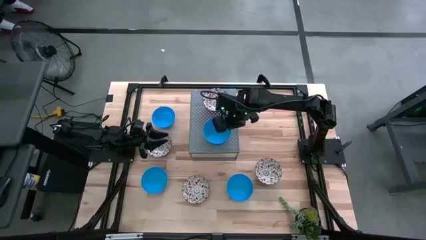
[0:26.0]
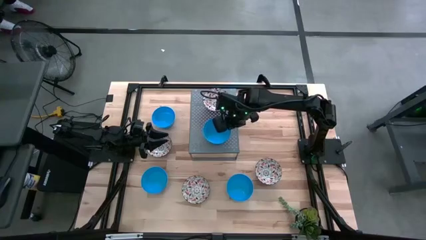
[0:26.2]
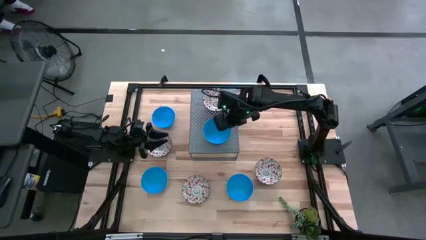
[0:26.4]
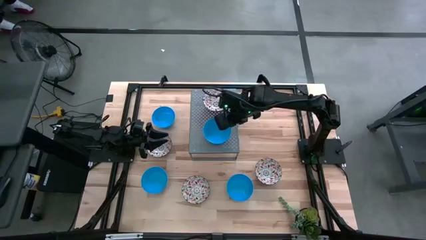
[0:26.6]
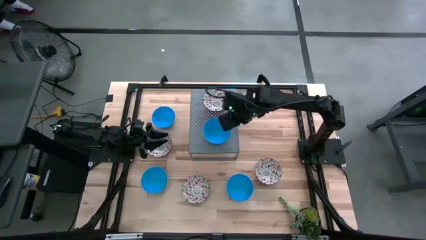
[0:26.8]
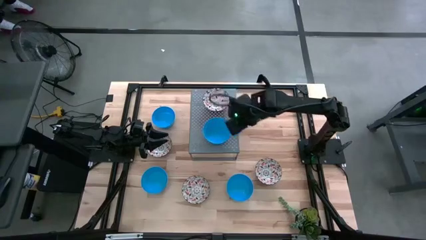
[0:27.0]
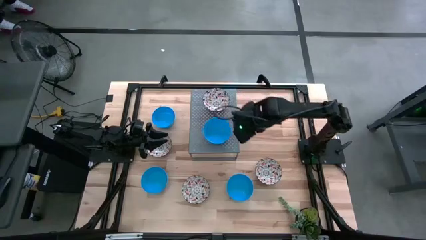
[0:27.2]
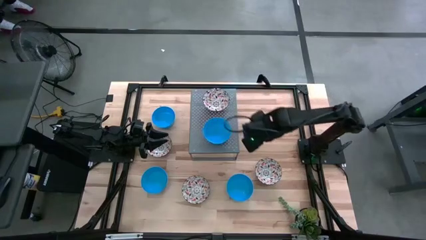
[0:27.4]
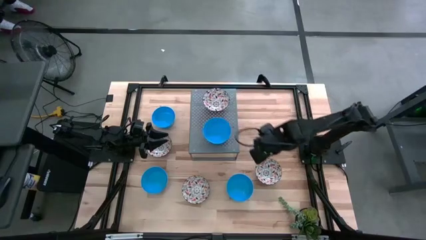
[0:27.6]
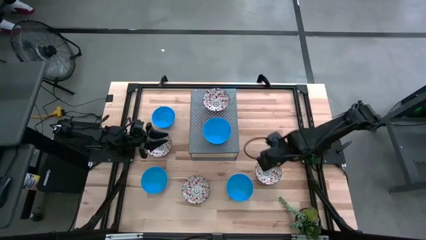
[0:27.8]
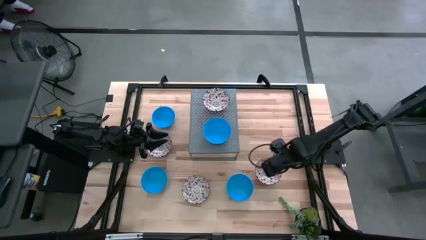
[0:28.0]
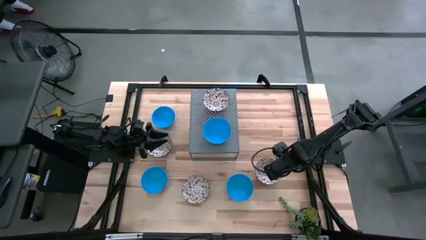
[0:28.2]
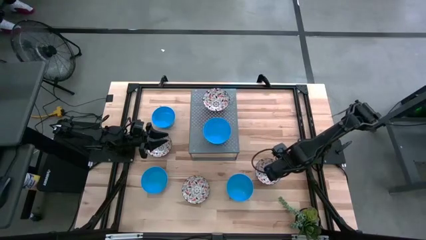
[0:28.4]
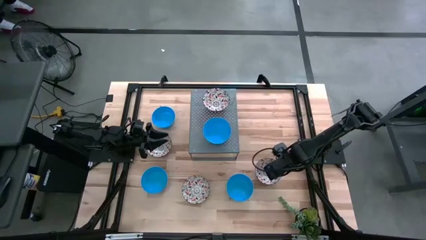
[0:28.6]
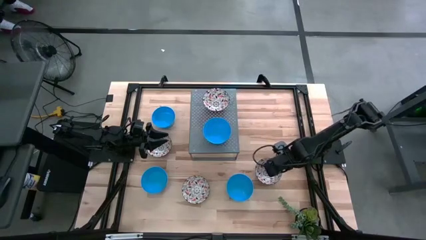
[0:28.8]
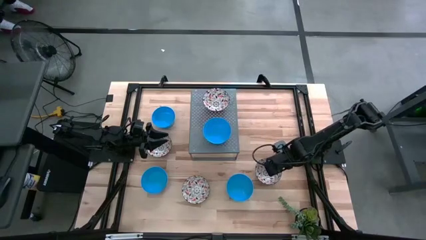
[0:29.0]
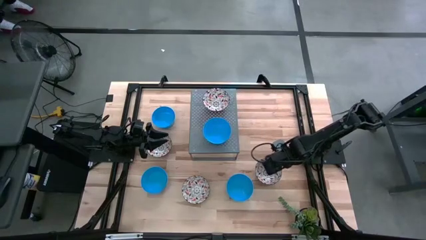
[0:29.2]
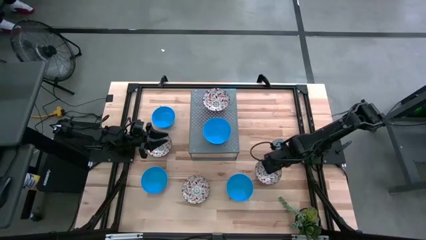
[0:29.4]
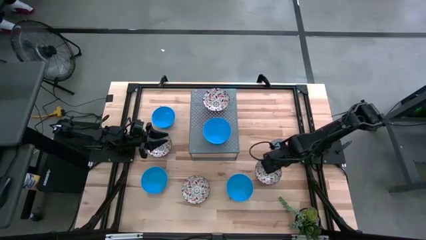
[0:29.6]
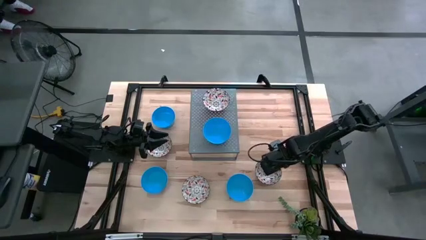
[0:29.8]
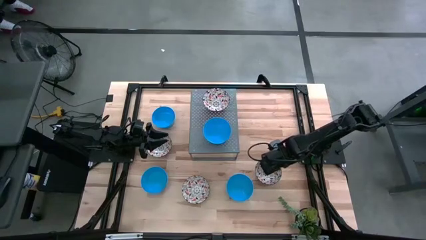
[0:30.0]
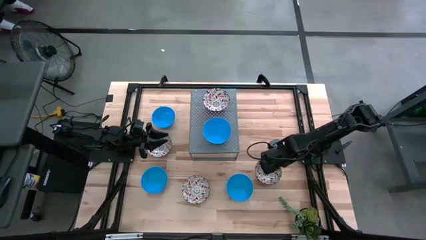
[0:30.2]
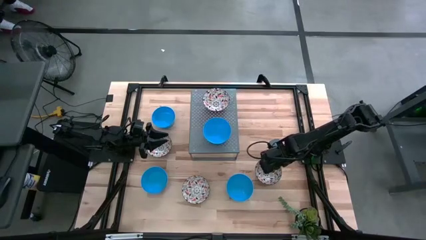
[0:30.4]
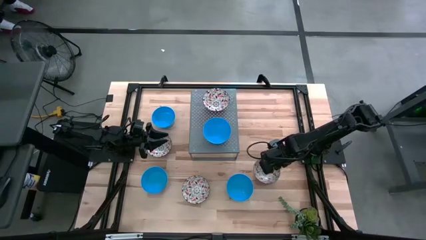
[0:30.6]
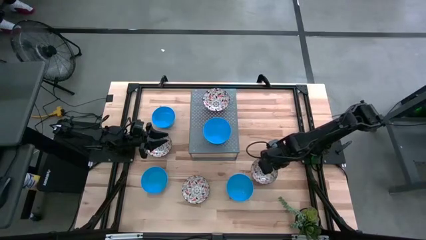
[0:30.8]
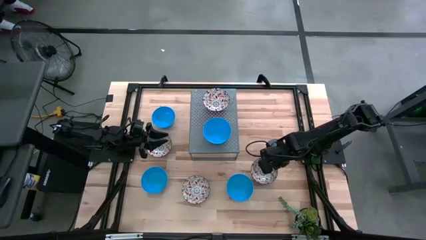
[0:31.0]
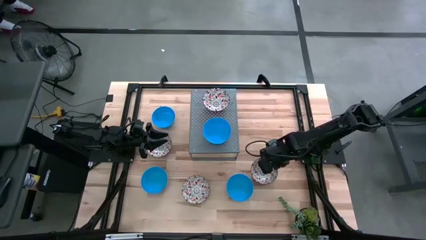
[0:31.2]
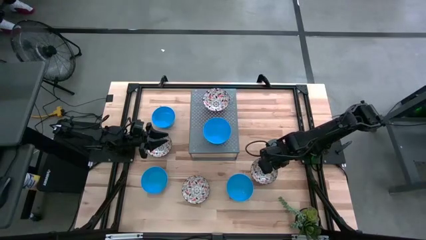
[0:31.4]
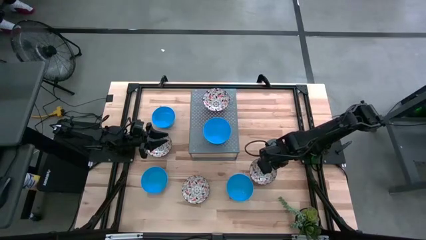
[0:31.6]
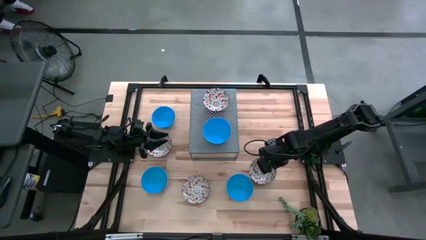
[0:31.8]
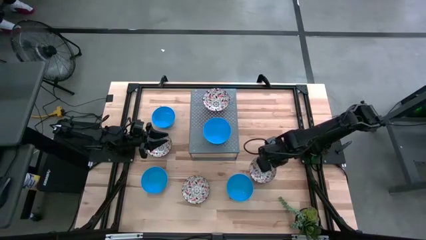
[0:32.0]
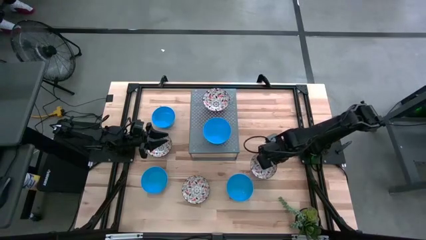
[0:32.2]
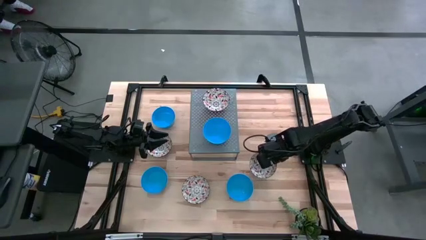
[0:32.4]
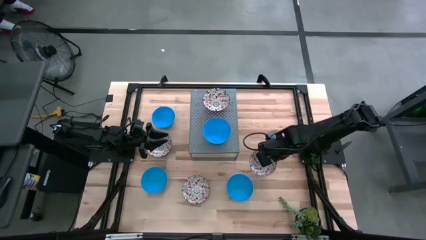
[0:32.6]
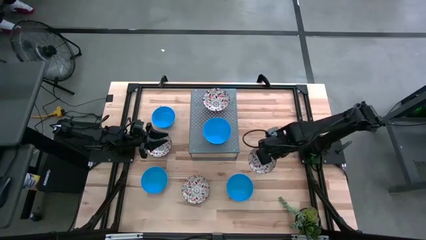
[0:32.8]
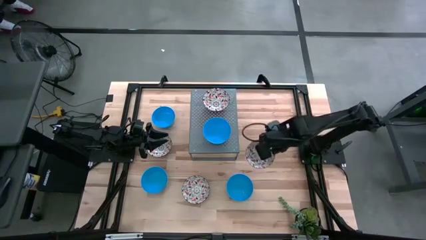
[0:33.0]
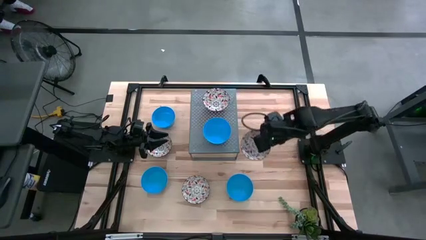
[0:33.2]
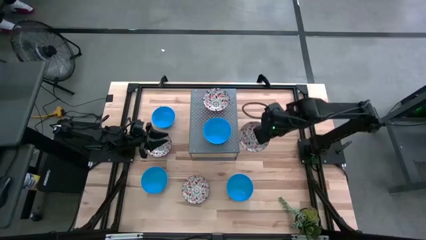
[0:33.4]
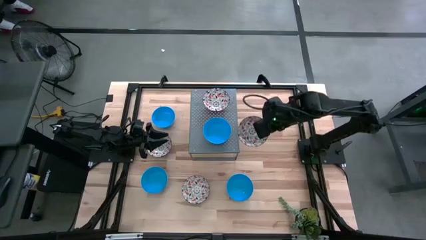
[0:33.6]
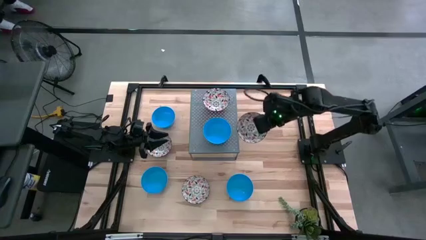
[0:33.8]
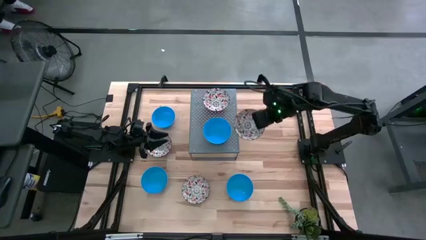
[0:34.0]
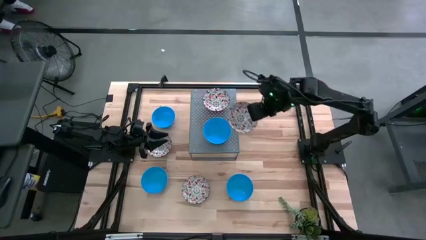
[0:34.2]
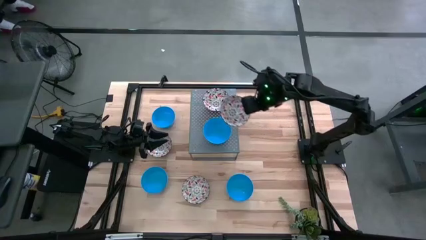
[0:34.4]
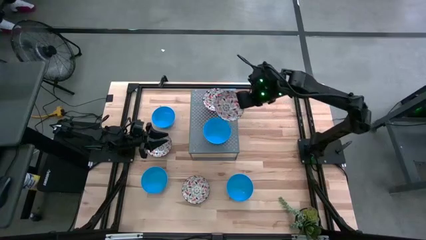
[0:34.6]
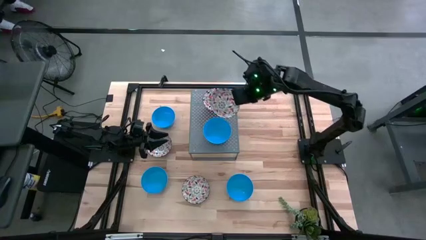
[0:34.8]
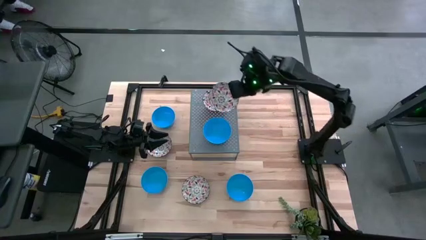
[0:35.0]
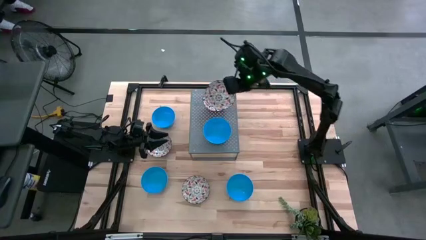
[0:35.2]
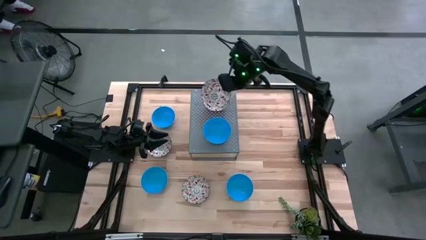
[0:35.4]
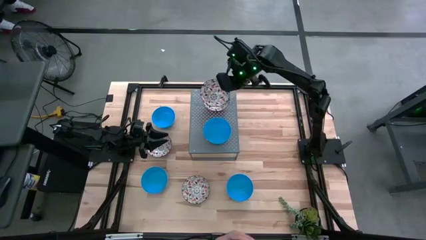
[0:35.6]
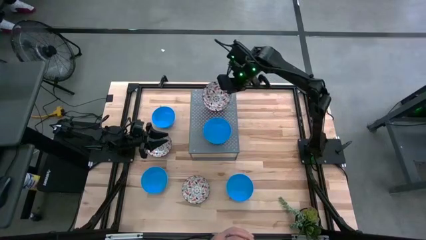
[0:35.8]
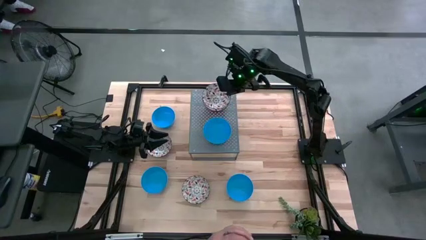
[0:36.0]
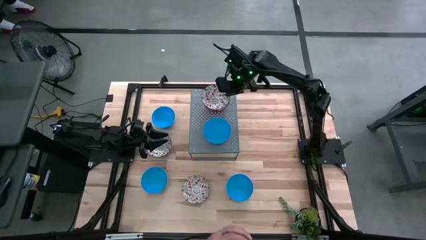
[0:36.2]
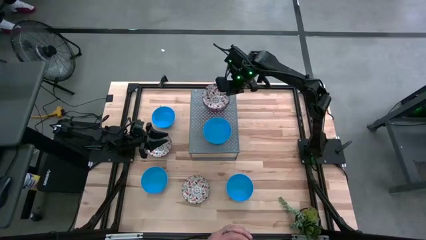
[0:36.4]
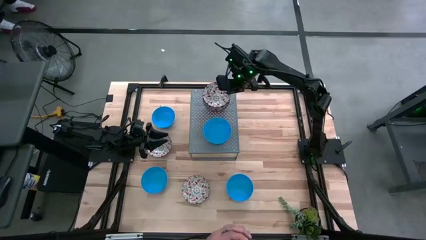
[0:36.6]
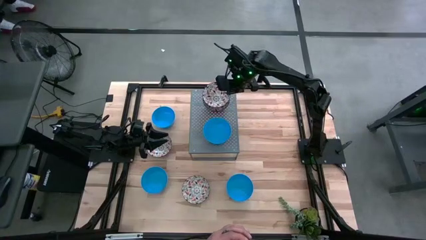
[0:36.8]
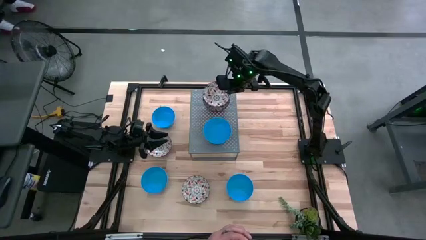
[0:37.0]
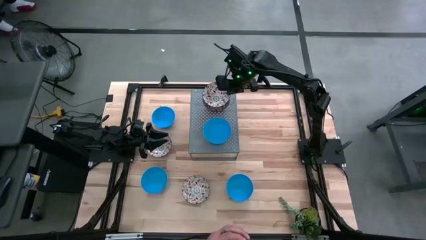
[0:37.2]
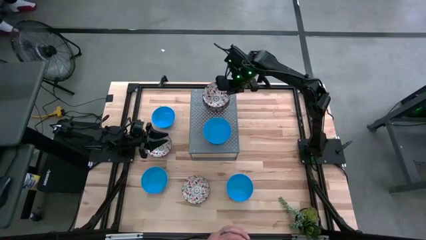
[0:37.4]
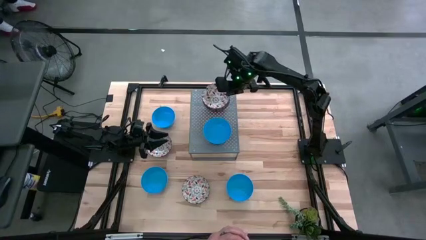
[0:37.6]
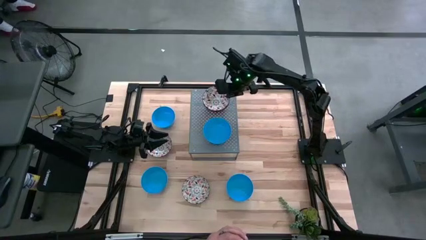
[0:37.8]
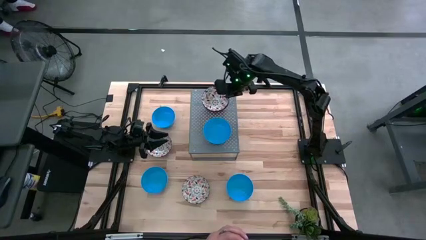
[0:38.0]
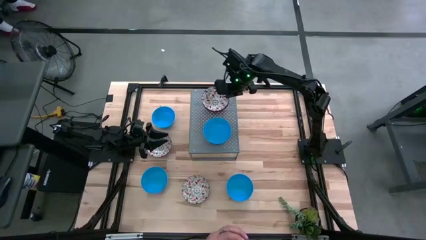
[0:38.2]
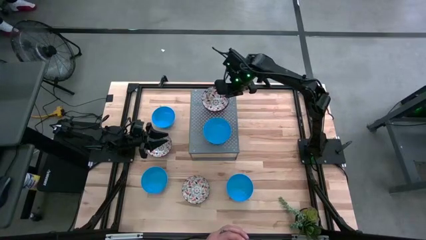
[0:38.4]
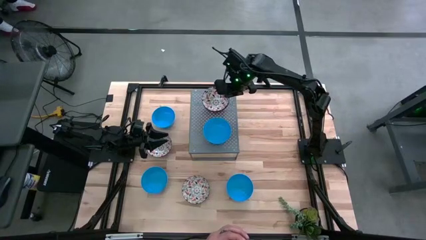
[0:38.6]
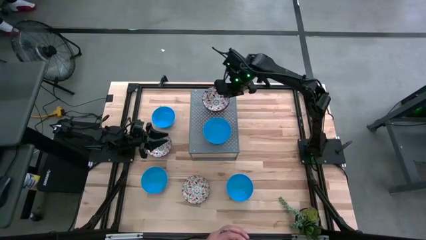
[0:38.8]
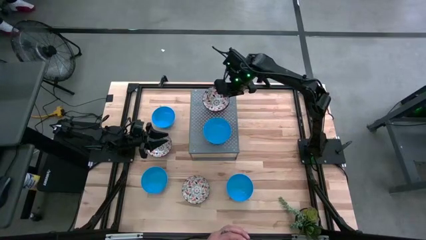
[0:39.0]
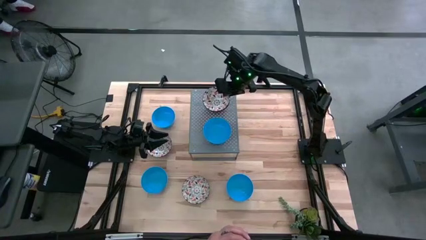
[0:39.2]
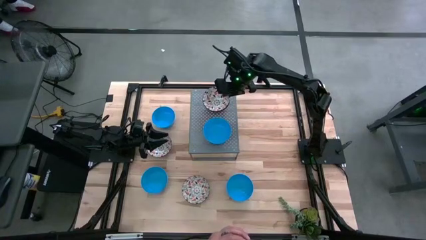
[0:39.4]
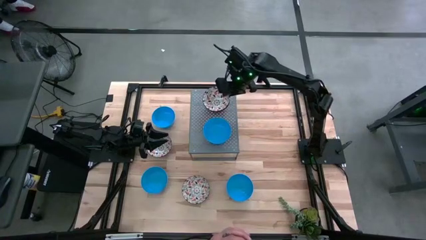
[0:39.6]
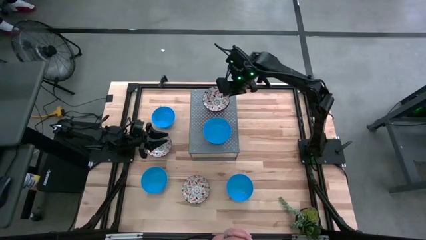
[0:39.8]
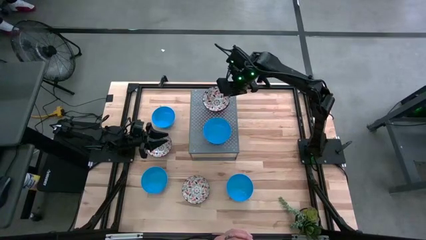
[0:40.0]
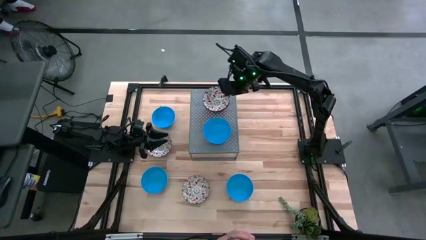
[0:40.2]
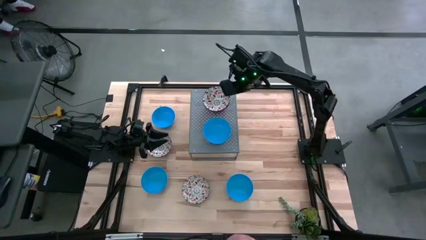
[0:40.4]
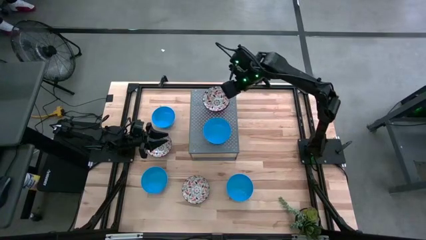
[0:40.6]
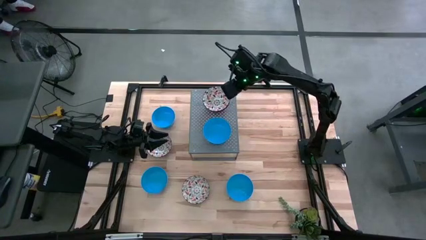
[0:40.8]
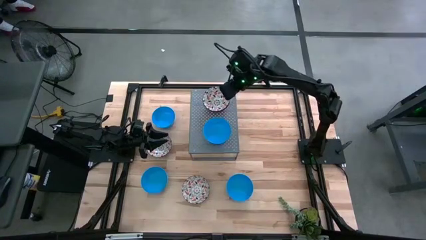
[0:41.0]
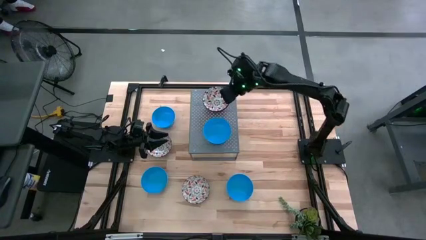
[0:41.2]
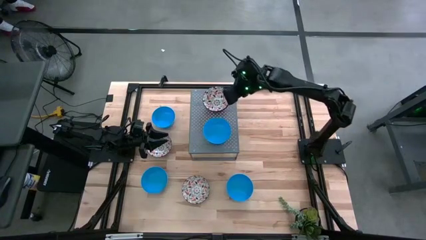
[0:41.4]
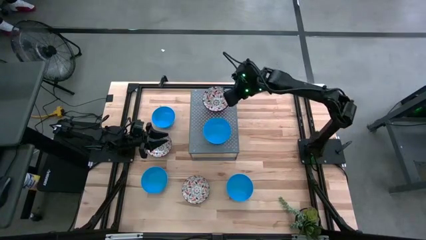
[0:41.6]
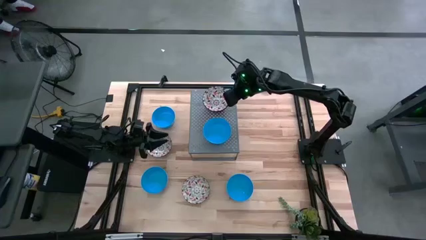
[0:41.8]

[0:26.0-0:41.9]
Task: Pick & Place Mini bowls
Stack the white patterned bowl on the white patterned bowl on the shelf
